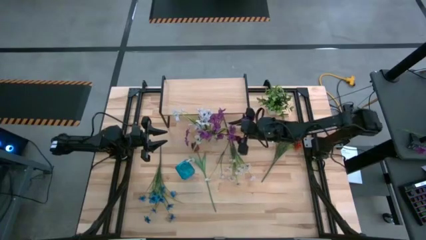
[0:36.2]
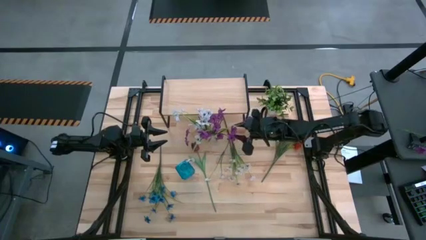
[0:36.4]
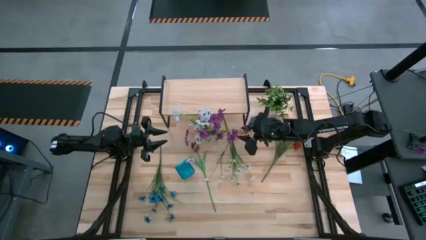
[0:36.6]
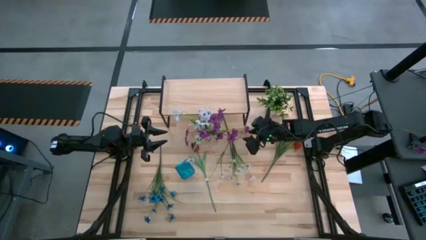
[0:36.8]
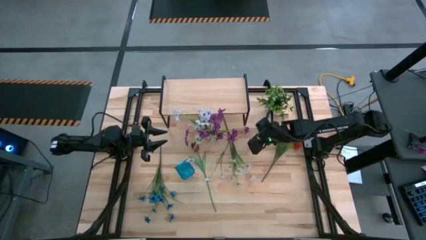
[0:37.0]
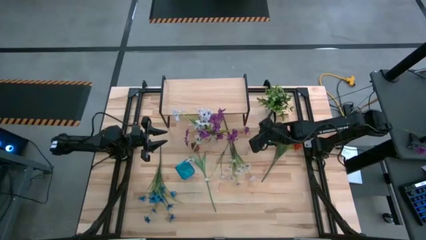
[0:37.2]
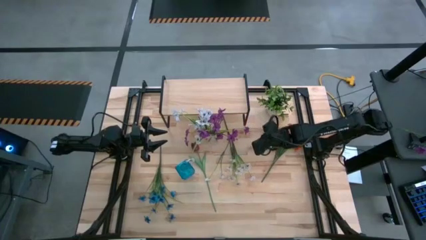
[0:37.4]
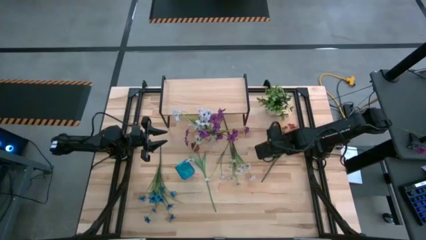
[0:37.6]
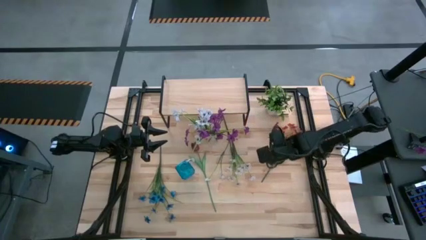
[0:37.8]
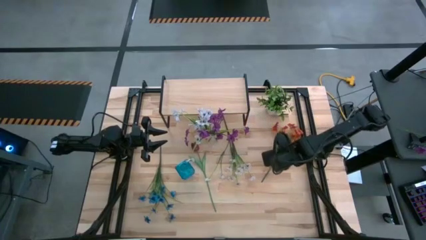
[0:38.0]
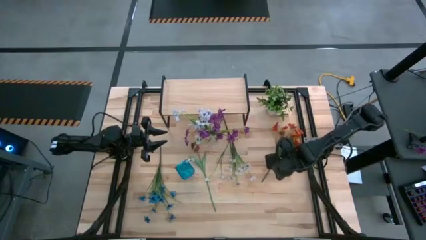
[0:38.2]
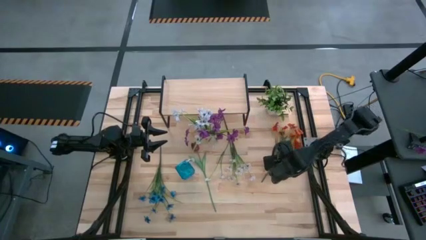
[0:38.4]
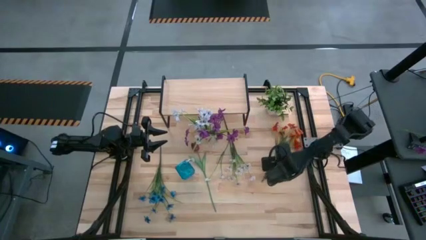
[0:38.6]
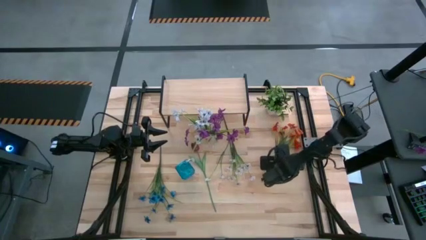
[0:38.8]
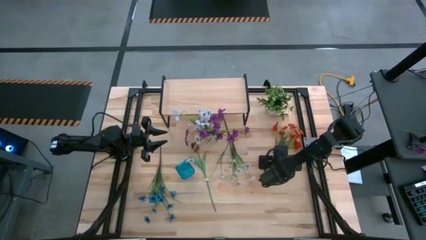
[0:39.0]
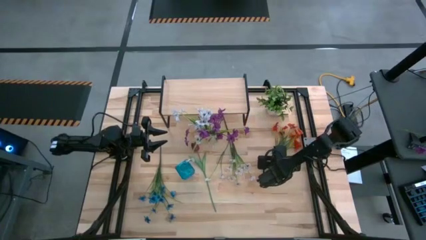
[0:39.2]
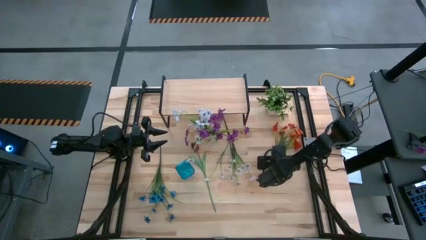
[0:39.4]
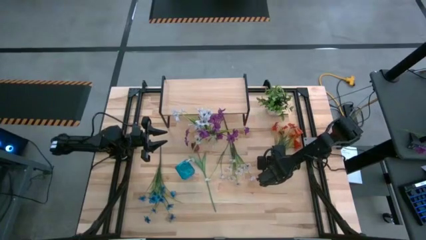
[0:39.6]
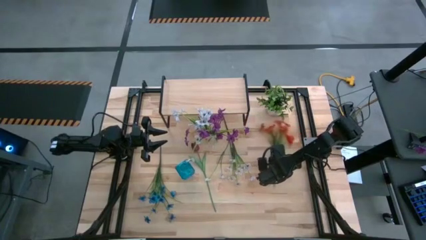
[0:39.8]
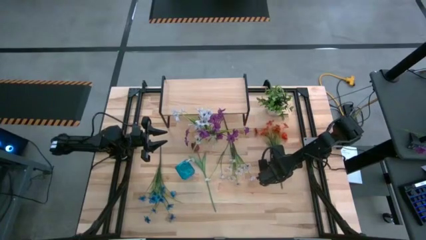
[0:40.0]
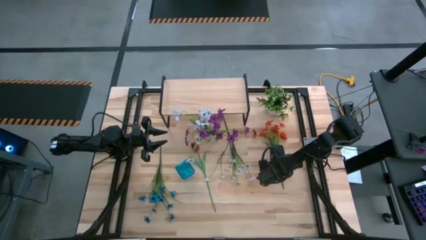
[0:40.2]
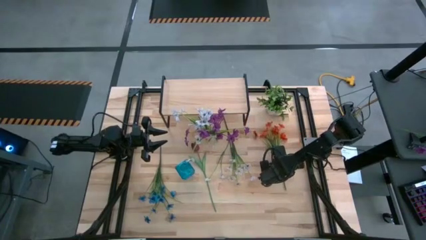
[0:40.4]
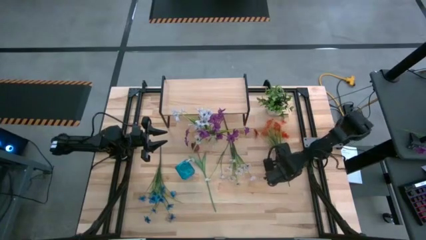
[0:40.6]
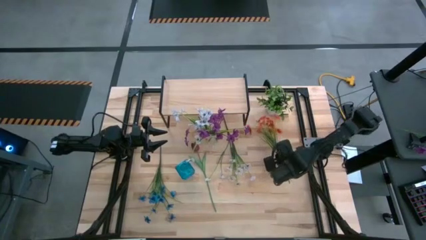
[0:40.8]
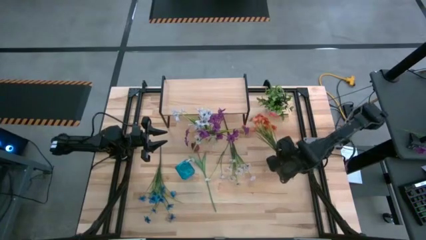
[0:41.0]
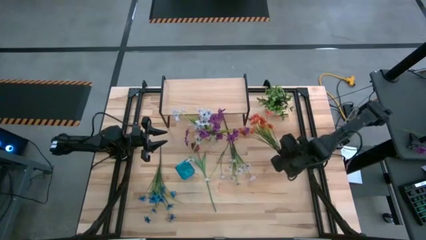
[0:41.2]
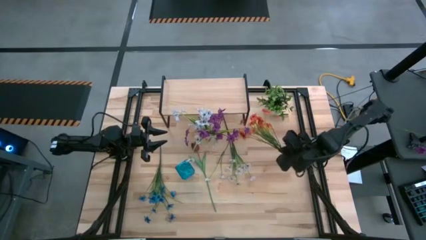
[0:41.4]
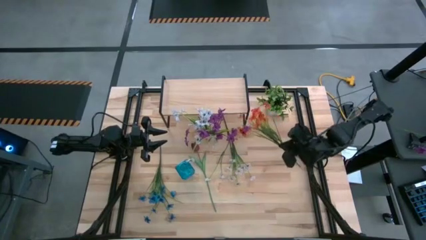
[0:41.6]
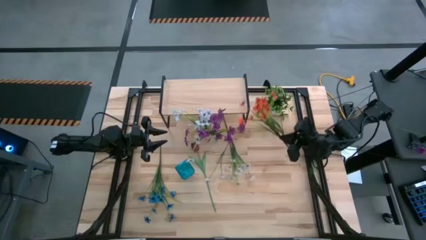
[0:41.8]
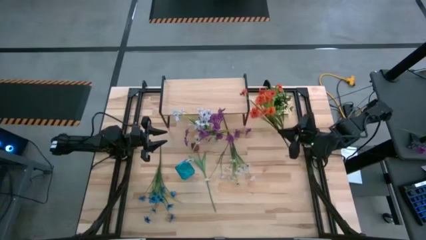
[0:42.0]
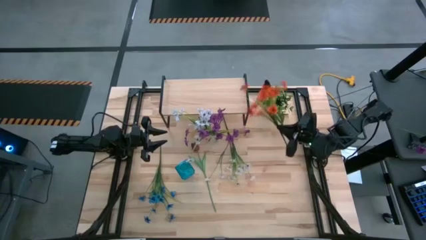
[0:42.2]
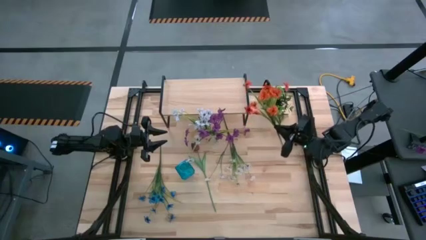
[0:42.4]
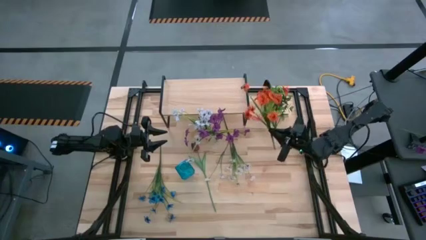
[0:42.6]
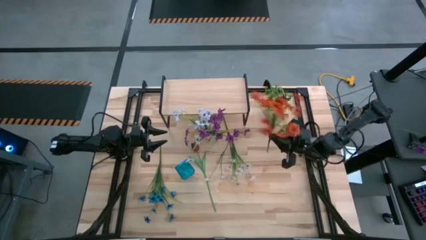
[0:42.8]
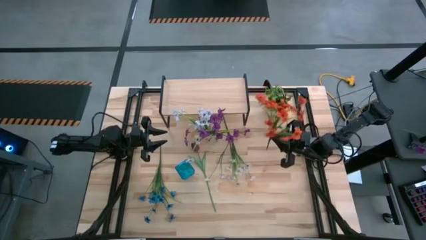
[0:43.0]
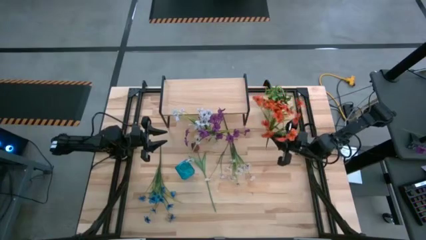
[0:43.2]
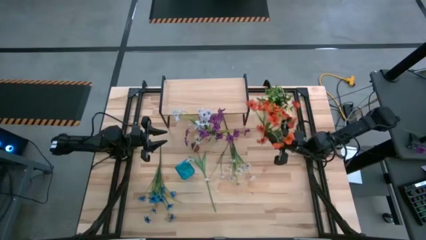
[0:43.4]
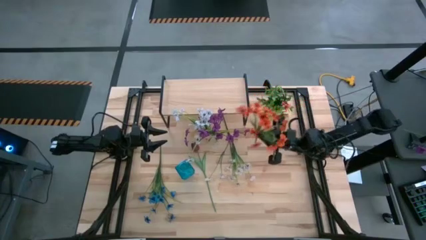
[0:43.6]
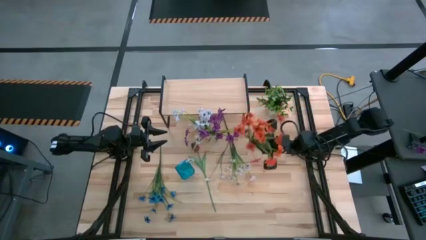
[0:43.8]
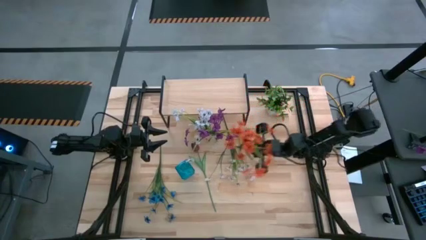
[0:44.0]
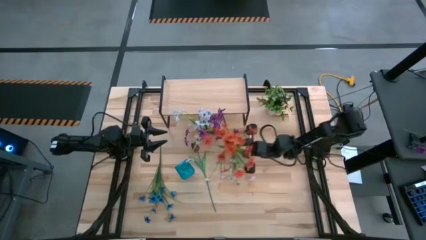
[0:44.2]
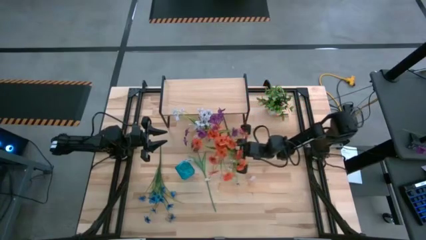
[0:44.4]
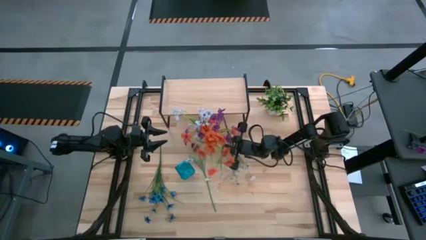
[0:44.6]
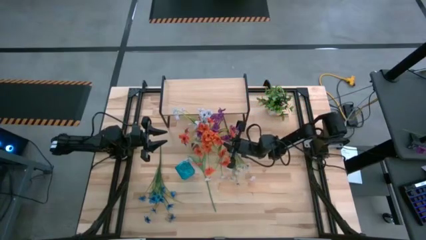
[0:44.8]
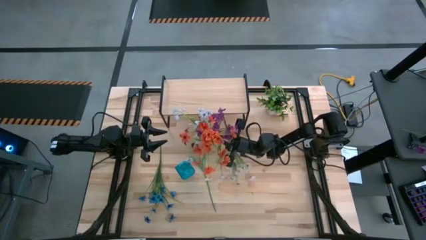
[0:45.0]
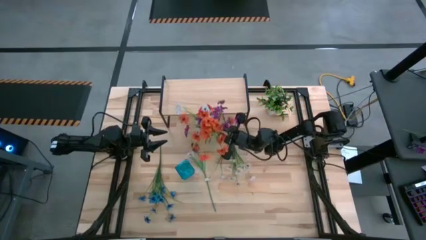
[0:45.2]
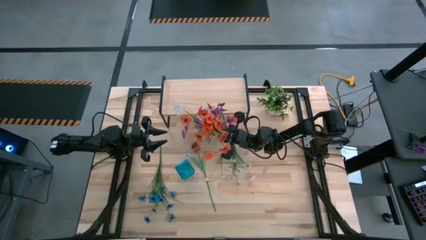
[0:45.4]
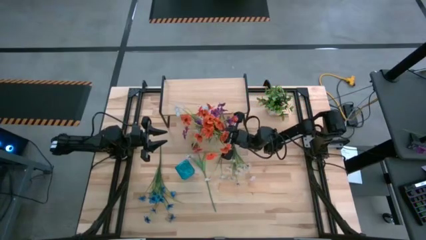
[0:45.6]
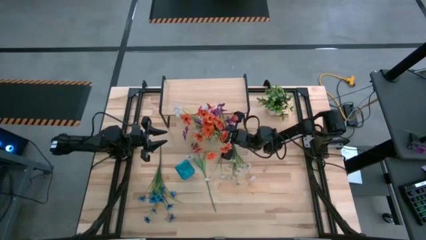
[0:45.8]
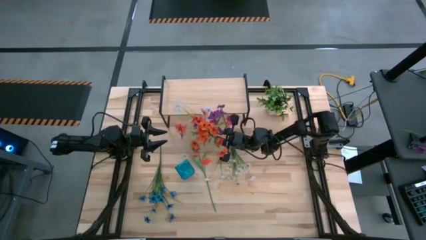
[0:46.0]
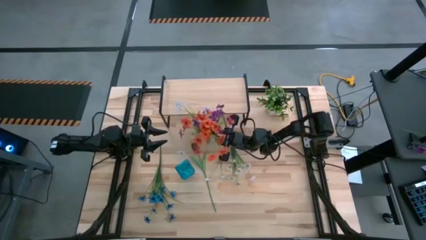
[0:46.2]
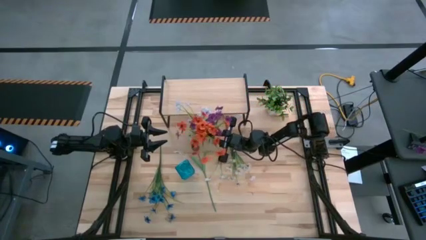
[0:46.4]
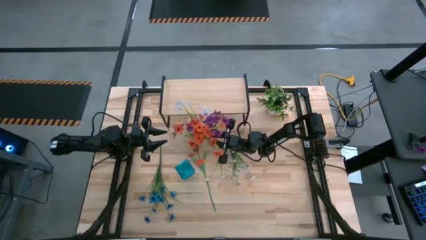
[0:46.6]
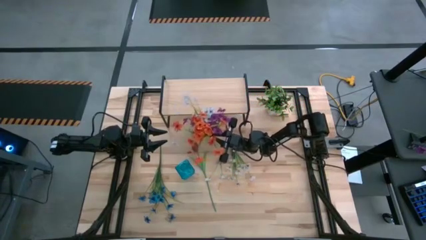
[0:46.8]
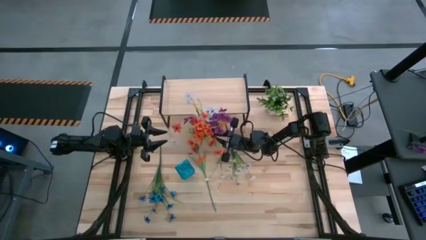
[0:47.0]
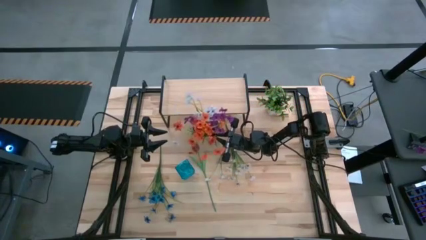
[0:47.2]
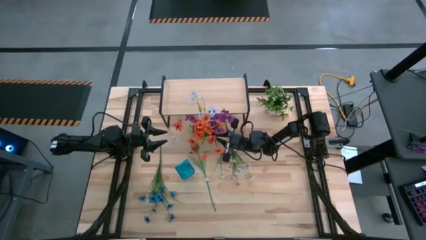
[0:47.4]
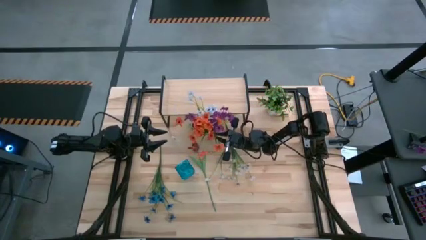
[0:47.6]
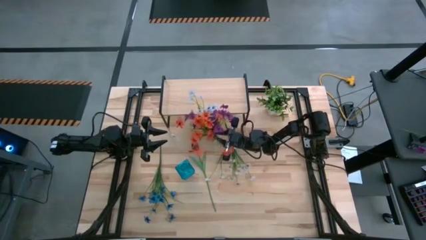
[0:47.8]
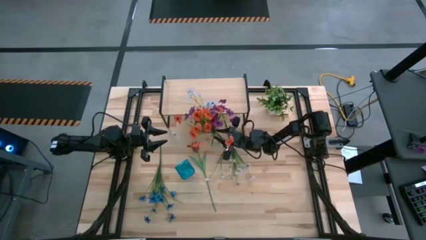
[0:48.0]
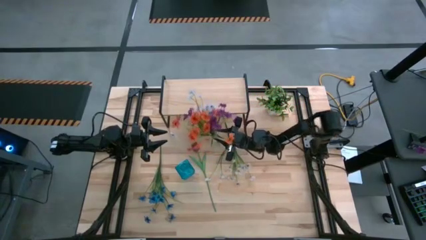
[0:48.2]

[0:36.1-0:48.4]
Task: Pick and place flowers into a vace then onto a shelf
Put the orange flowers into the transparent vase
